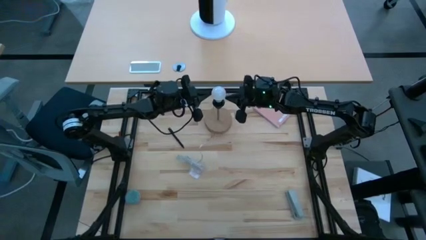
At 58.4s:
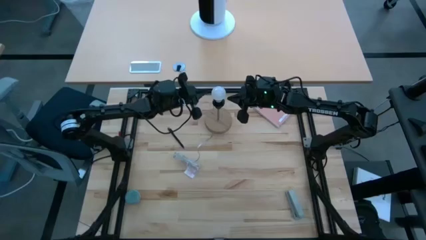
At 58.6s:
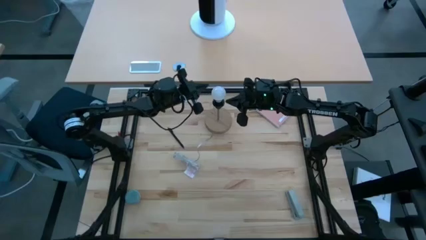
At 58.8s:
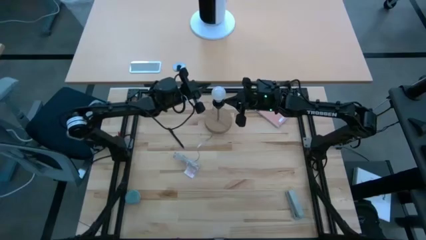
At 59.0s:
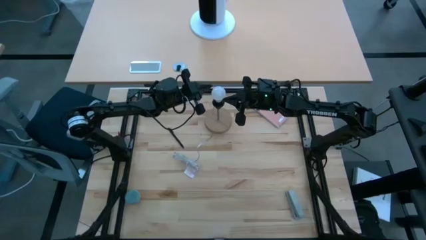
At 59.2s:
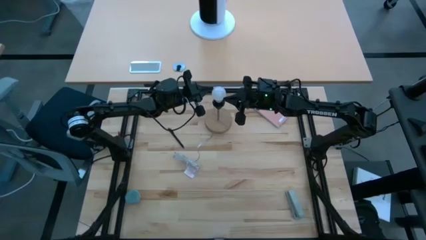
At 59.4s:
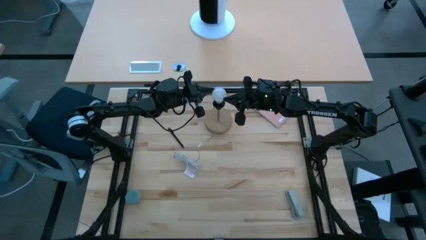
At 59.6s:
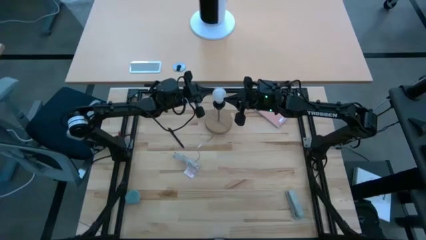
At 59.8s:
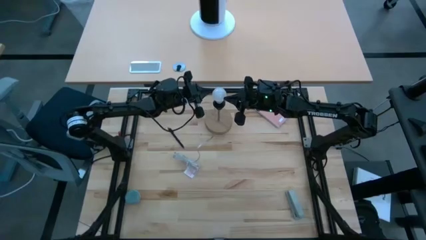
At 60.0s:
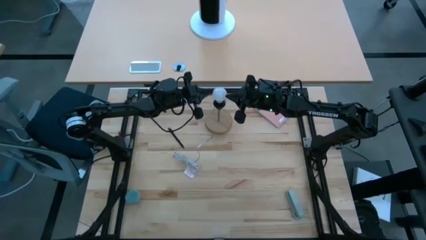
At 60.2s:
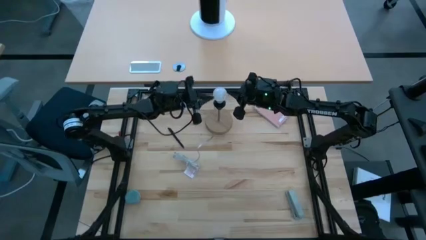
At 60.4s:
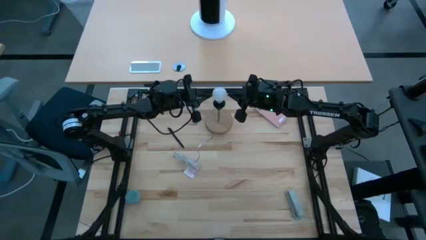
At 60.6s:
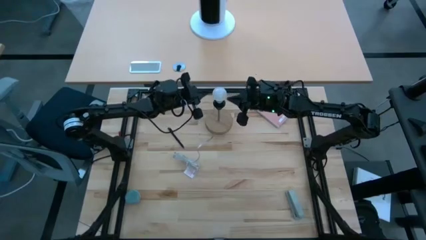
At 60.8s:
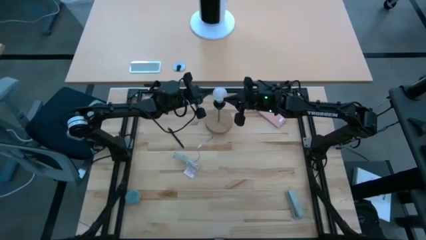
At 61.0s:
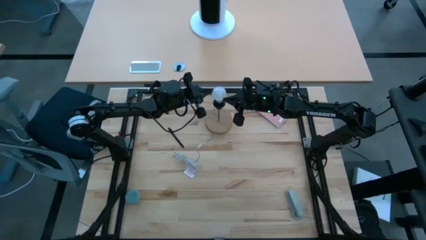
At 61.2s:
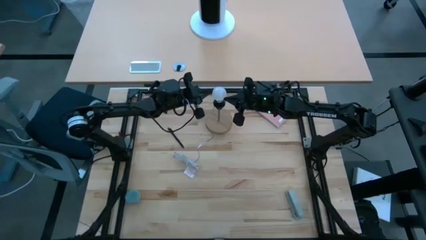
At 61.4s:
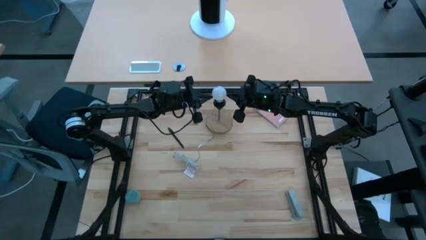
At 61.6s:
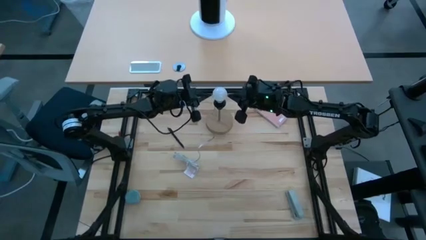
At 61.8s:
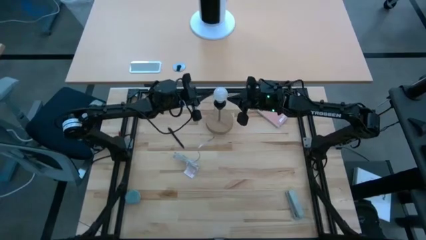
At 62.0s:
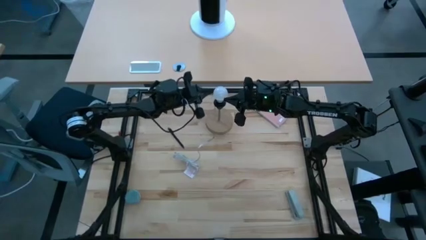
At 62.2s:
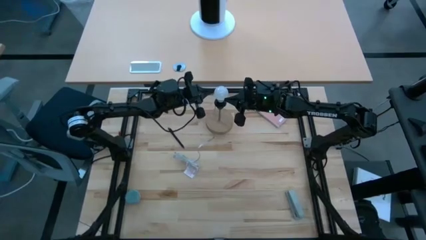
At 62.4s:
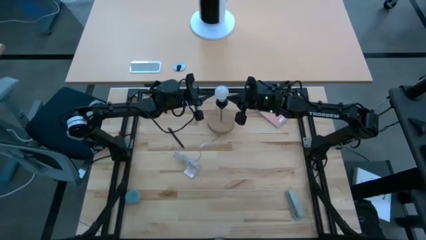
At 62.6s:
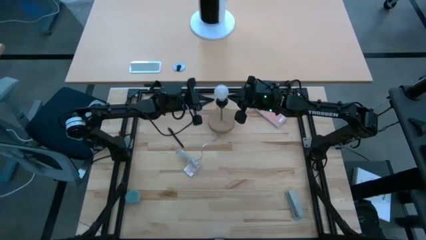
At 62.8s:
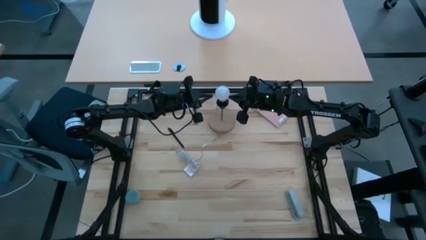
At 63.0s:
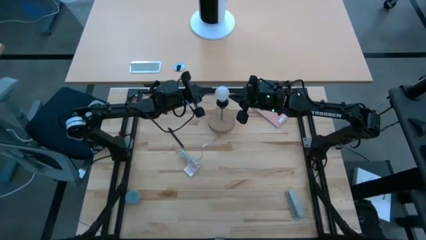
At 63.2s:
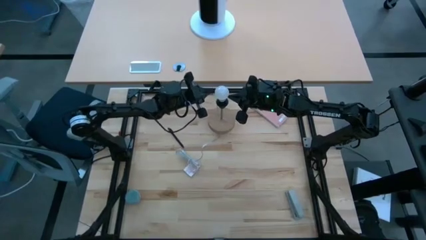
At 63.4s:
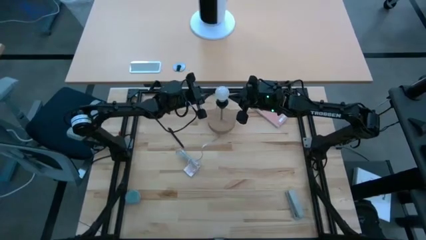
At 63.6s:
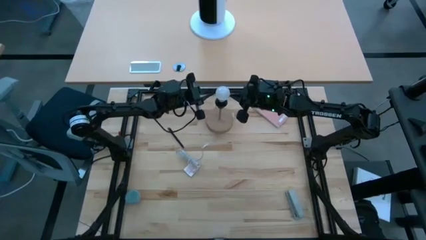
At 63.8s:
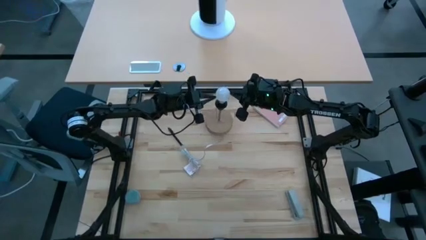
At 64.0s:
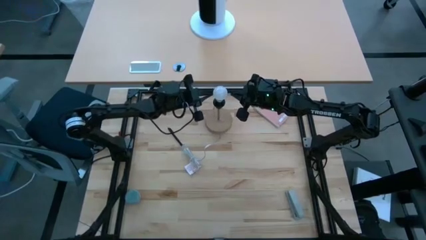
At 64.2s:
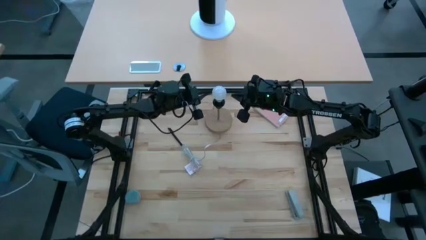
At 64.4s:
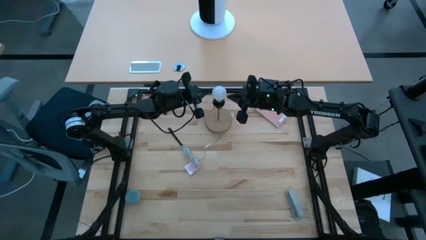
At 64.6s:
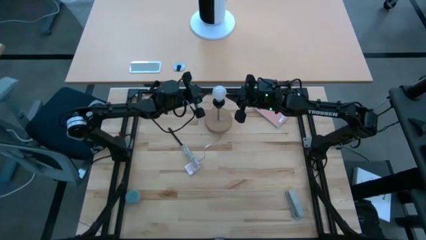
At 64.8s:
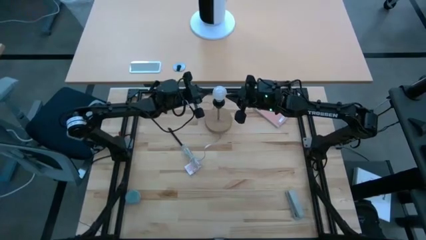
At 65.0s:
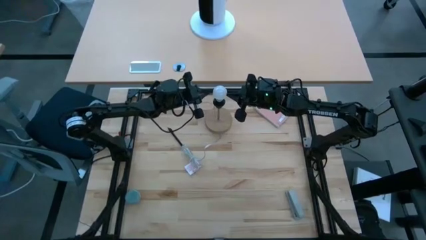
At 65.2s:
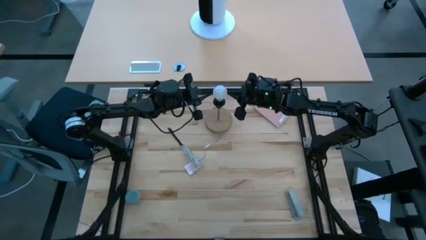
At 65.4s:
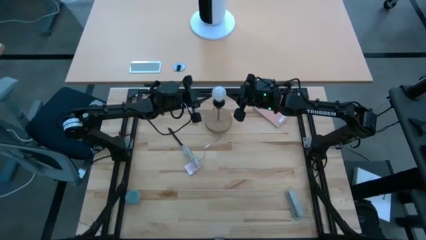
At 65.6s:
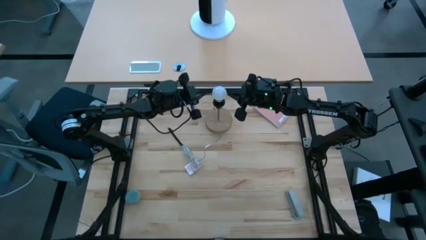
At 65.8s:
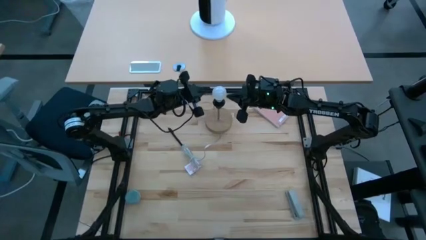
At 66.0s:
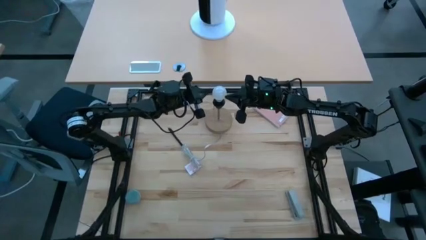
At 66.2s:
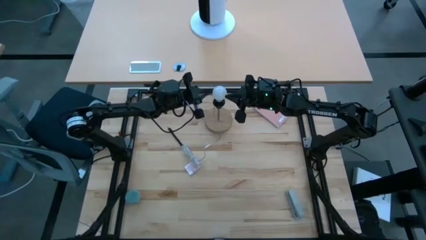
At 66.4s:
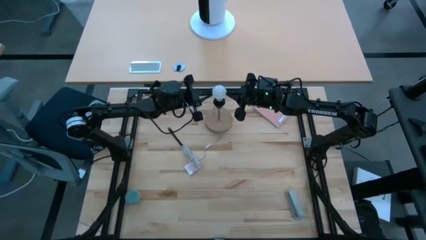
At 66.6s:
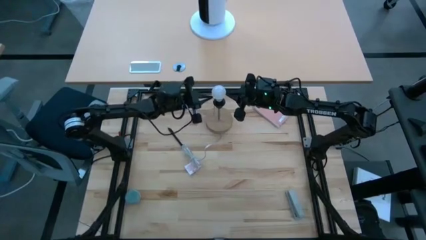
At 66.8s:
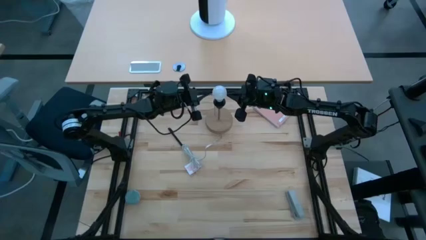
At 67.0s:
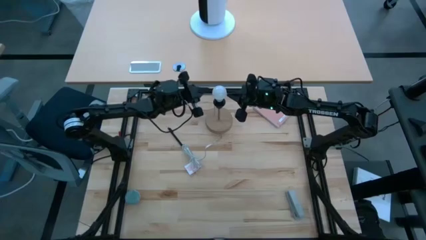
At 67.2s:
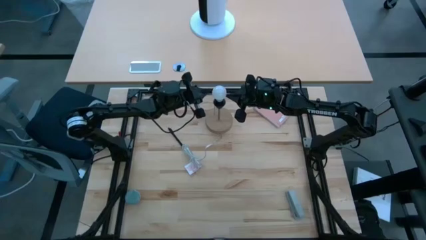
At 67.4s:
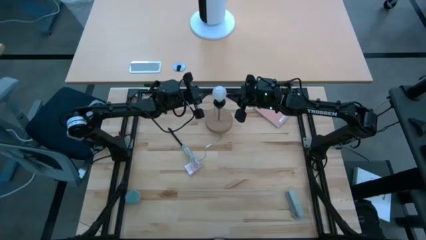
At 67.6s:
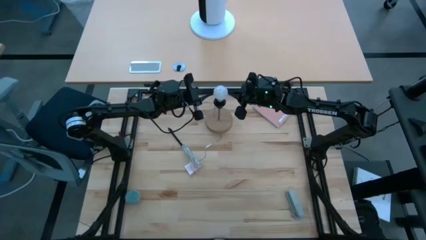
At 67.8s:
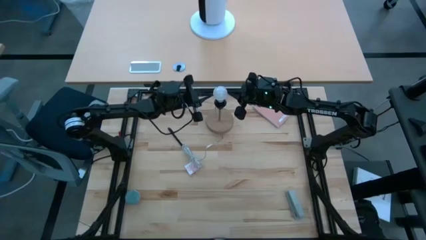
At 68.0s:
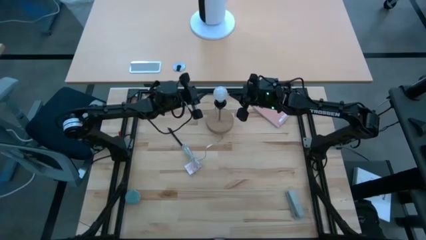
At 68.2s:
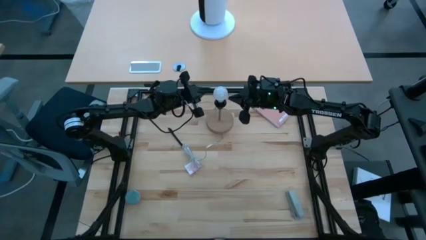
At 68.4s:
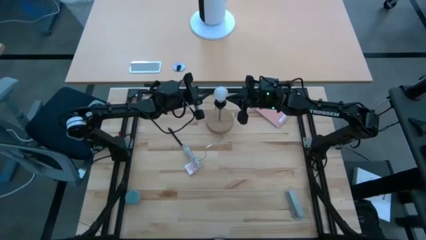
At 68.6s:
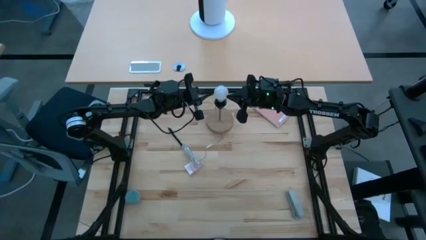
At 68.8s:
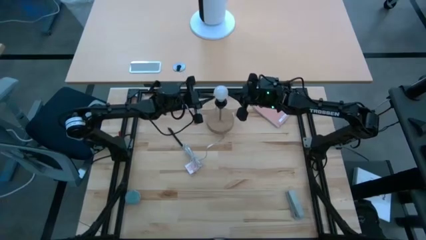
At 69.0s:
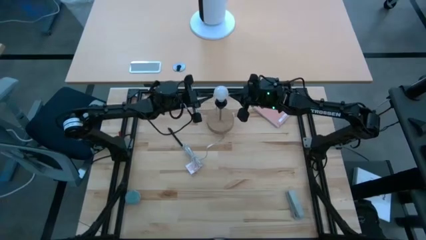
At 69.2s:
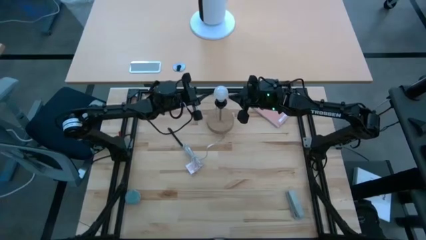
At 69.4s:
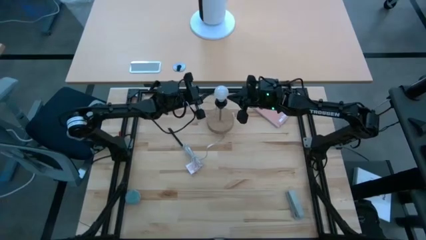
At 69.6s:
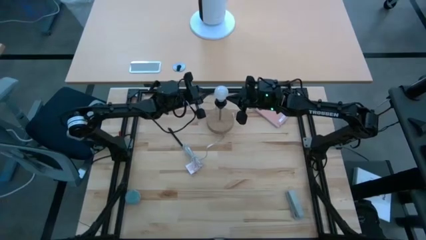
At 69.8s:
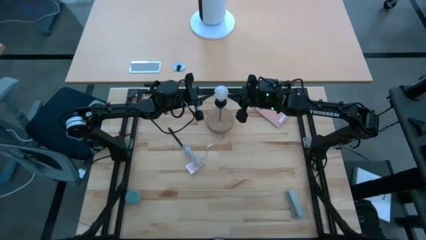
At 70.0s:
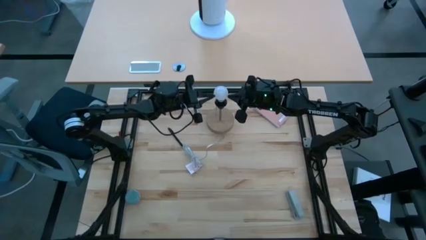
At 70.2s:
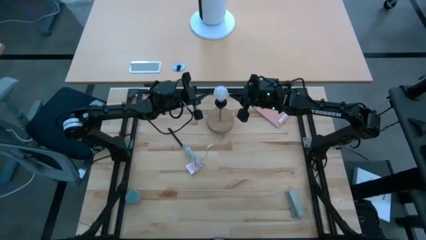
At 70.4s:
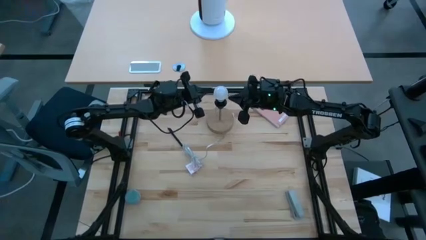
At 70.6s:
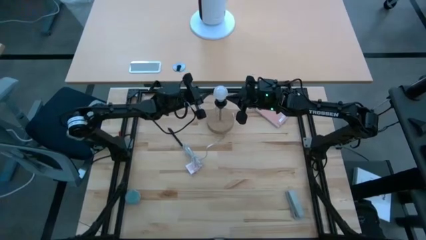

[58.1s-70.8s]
Task: Screw lightbulb
Remove the lightbulb from the lamp

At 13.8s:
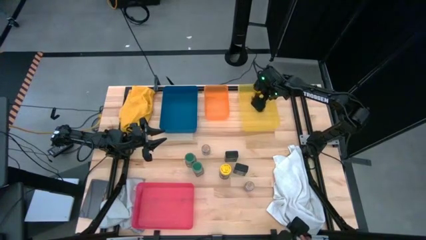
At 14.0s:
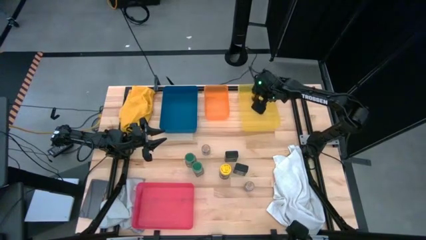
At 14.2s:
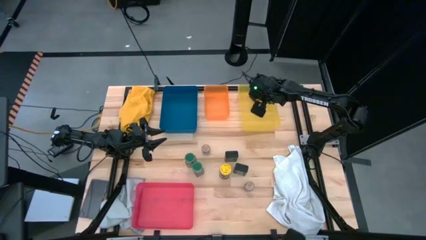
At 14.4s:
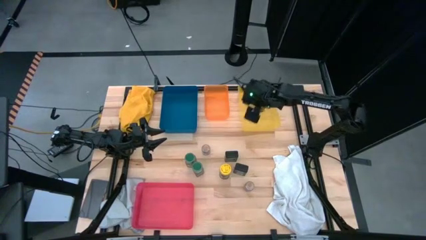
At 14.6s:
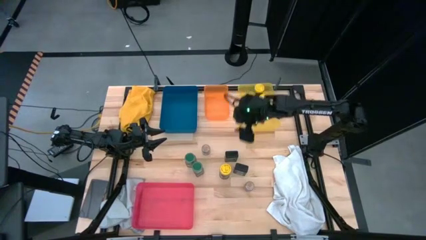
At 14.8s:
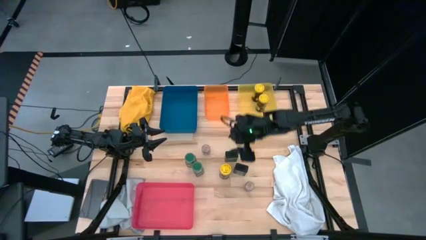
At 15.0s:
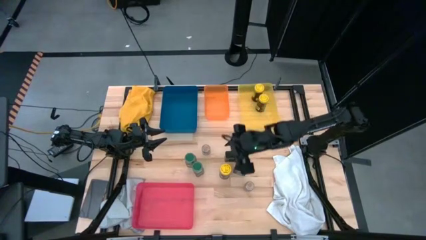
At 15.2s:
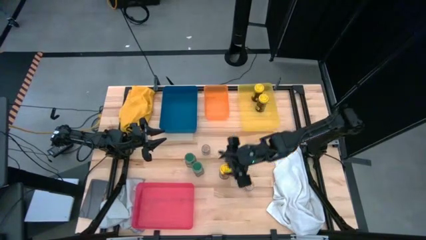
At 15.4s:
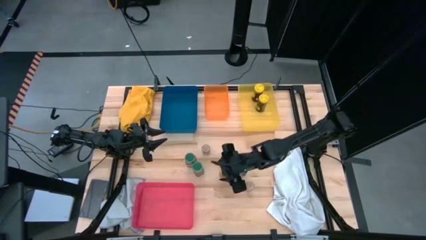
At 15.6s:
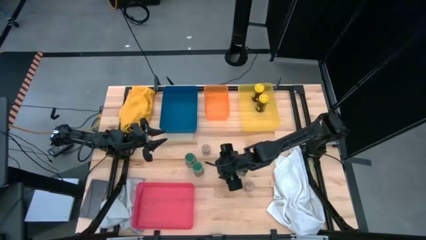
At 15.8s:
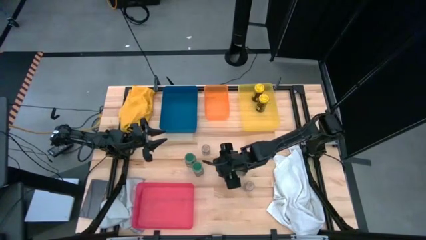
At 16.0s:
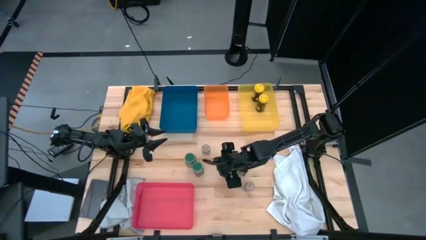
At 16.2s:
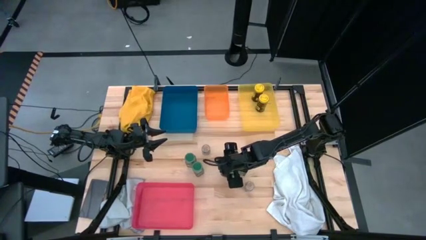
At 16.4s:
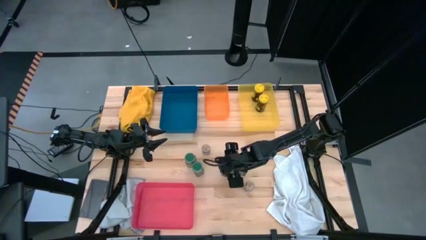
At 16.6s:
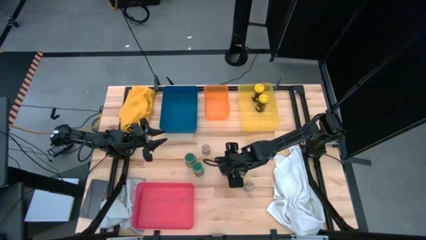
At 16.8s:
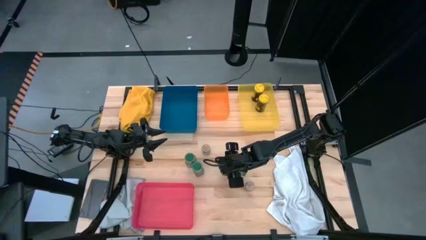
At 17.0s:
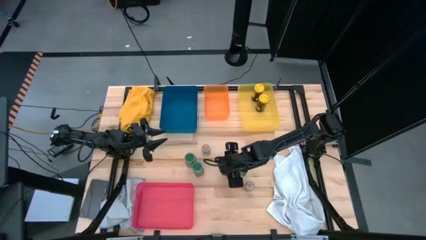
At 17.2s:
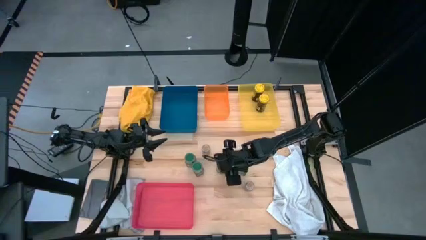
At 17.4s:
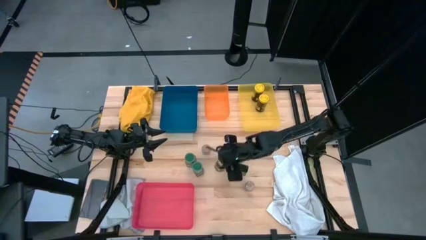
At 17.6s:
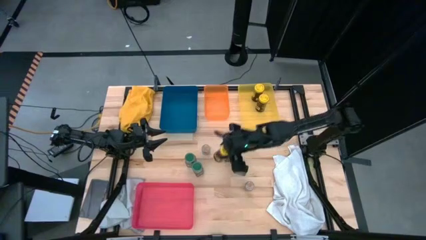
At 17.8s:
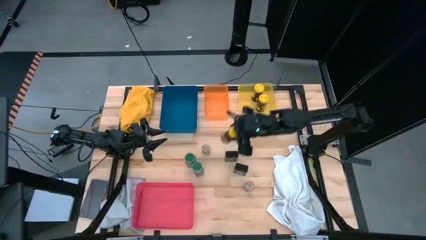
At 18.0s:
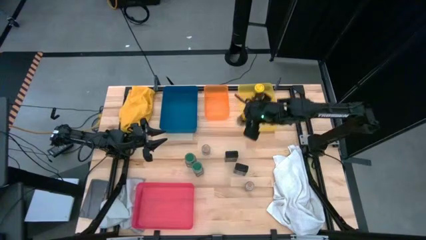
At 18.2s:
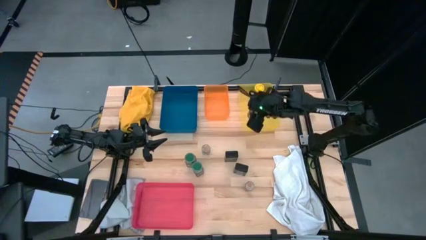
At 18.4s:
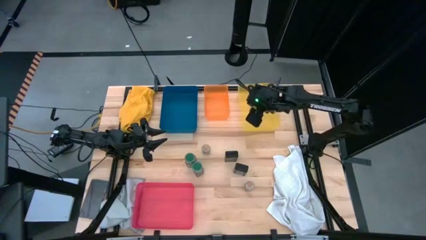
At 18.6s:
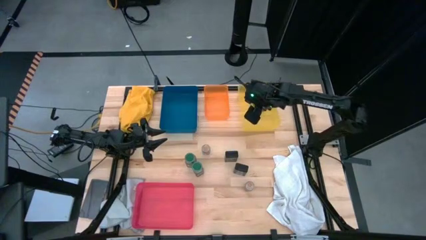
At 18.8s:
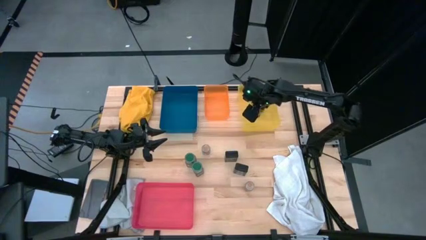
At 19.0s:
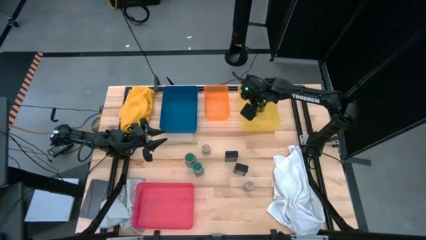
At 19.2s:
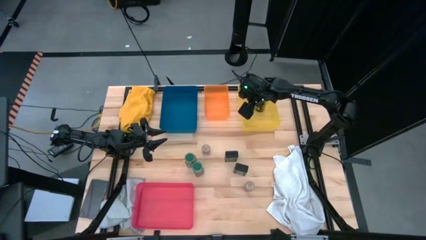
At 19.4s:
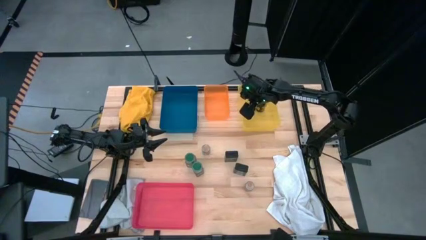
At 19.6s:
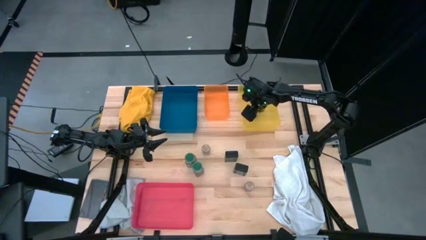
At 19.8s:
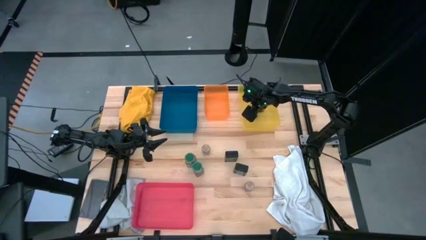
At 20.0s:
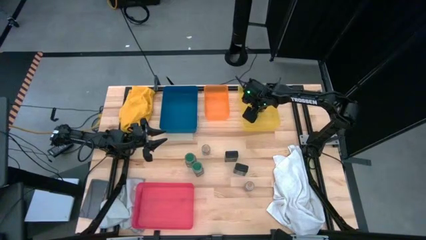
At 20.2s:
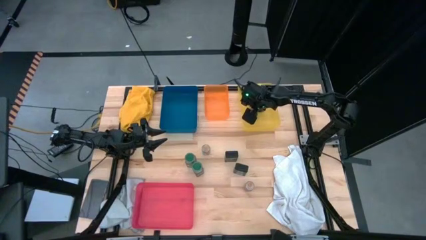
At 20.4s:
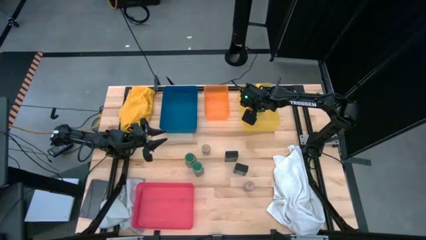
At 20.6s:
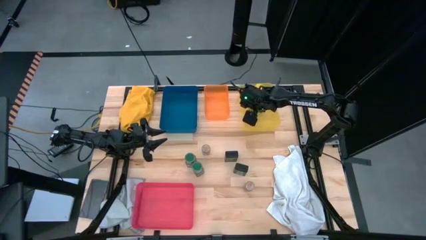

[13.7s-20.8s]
Task: Sort spices by type
Put the yellow seasoning bottle into the yellow bin
